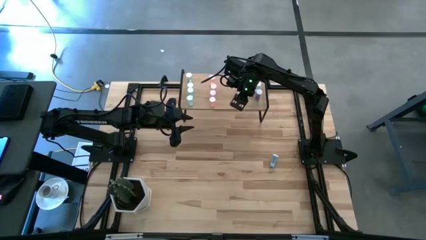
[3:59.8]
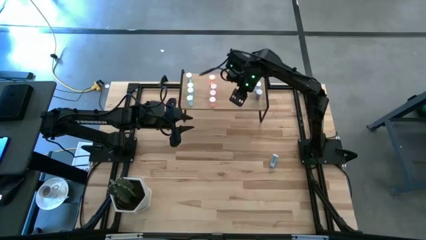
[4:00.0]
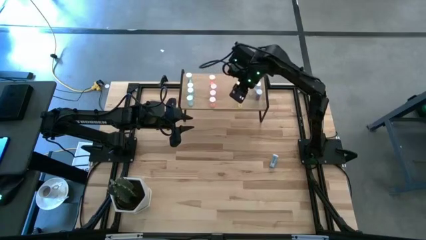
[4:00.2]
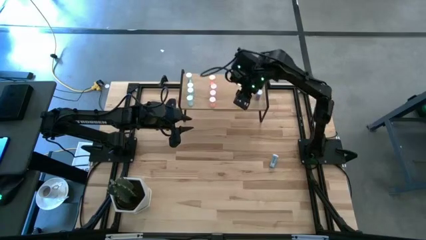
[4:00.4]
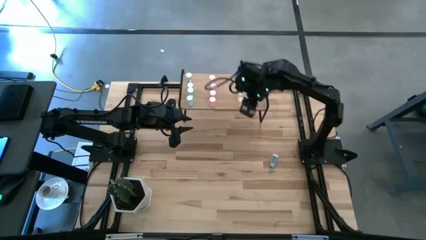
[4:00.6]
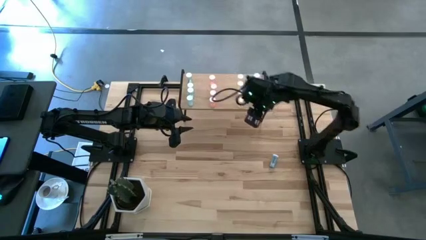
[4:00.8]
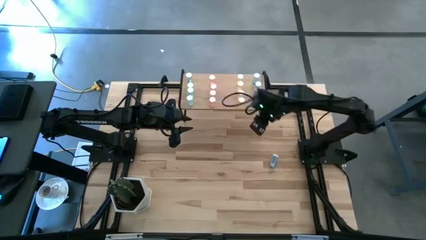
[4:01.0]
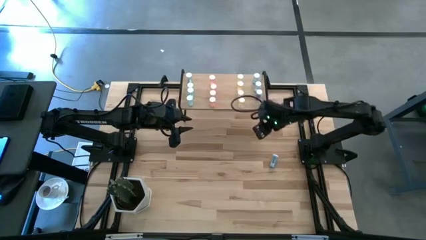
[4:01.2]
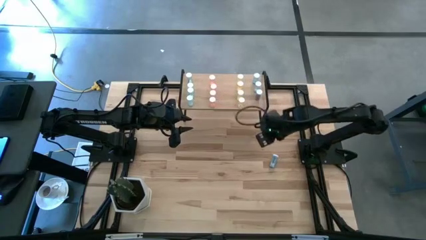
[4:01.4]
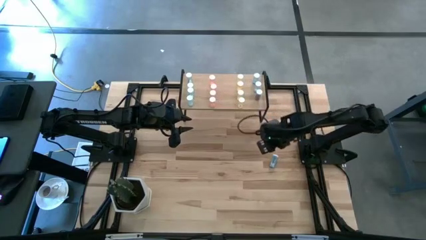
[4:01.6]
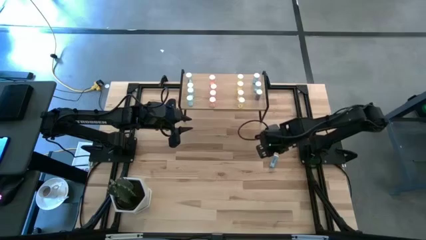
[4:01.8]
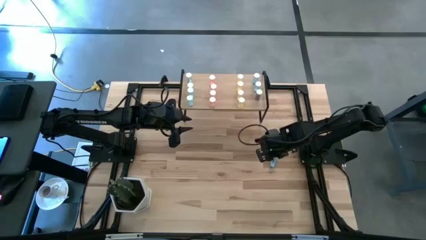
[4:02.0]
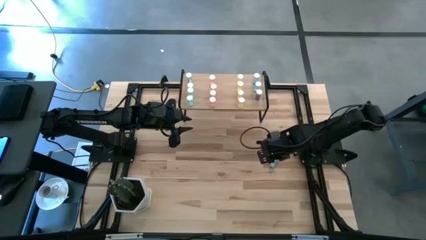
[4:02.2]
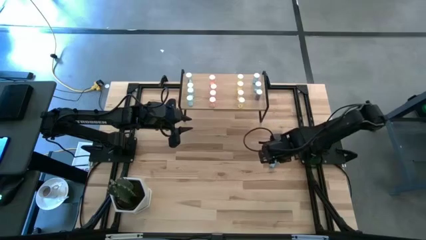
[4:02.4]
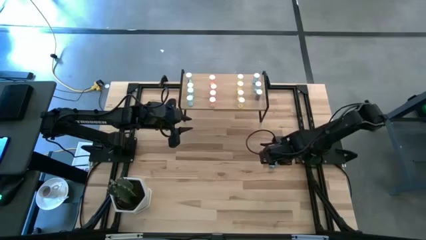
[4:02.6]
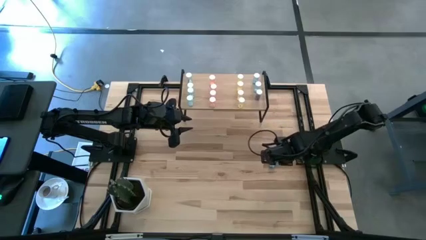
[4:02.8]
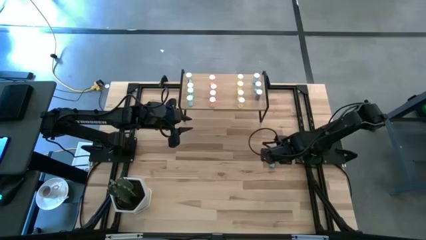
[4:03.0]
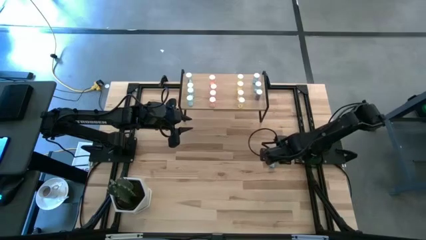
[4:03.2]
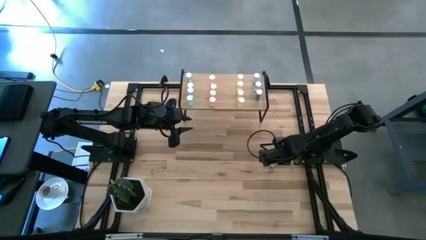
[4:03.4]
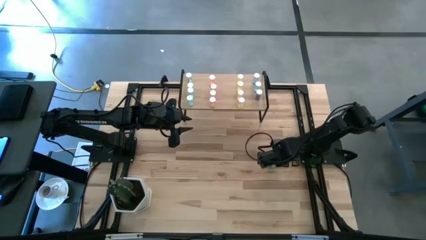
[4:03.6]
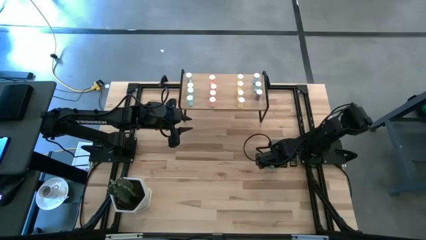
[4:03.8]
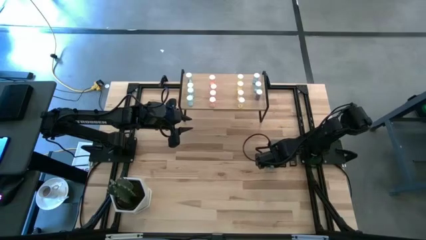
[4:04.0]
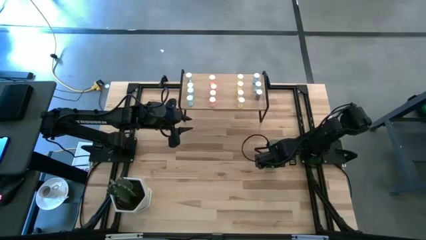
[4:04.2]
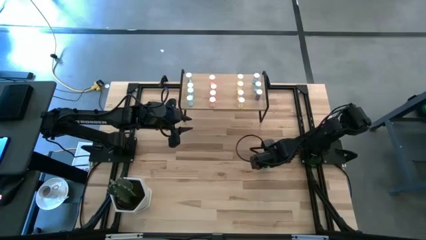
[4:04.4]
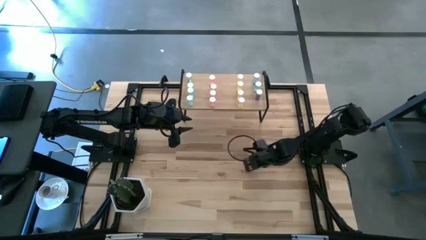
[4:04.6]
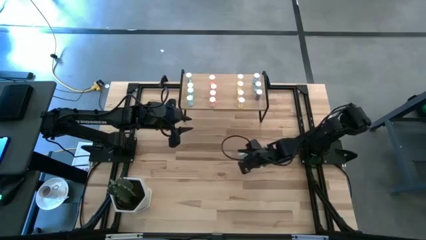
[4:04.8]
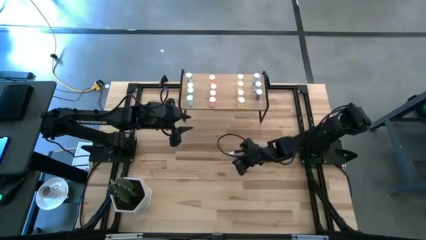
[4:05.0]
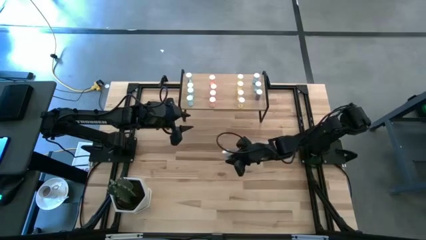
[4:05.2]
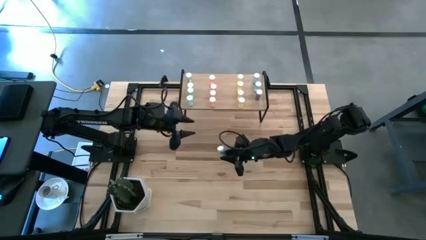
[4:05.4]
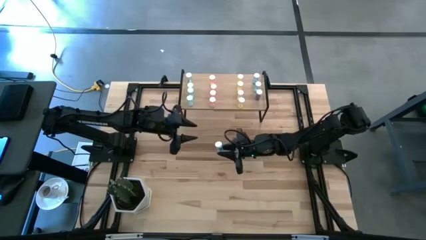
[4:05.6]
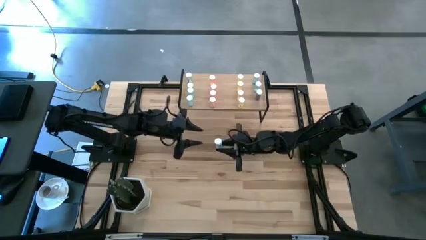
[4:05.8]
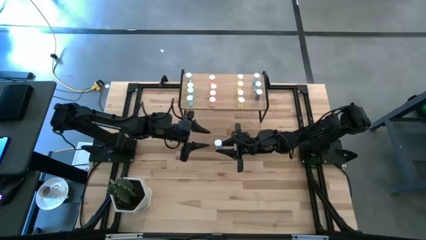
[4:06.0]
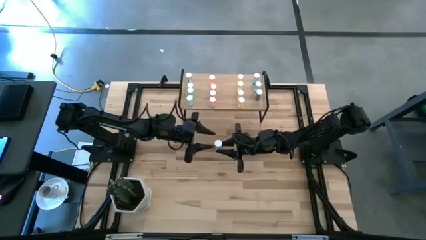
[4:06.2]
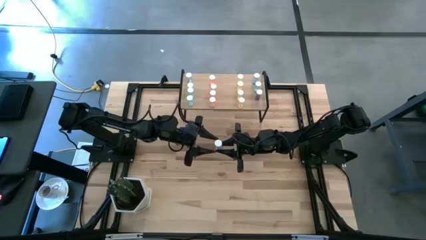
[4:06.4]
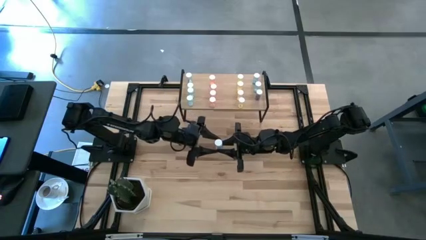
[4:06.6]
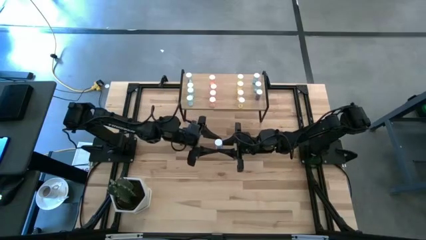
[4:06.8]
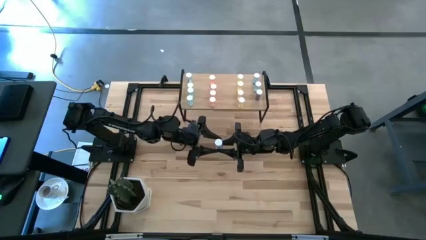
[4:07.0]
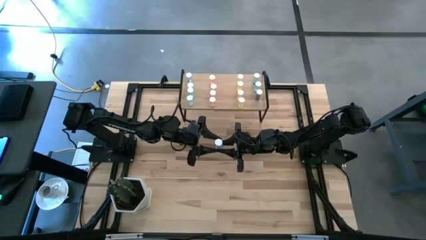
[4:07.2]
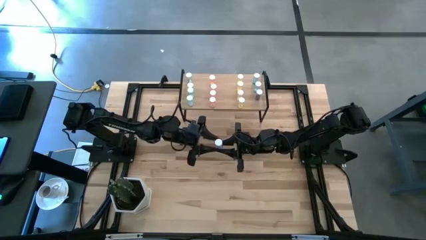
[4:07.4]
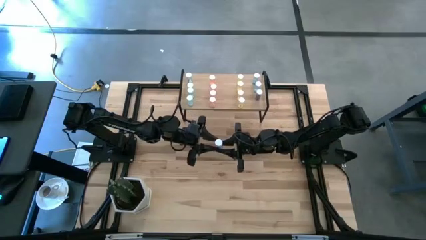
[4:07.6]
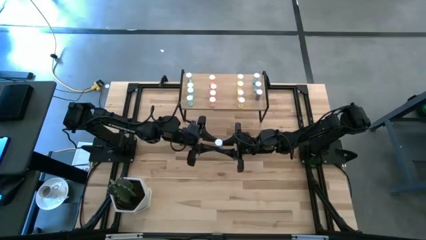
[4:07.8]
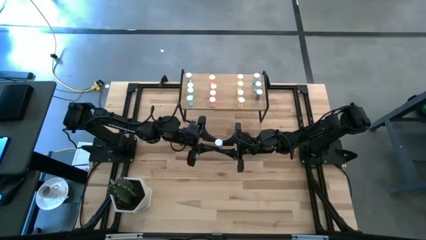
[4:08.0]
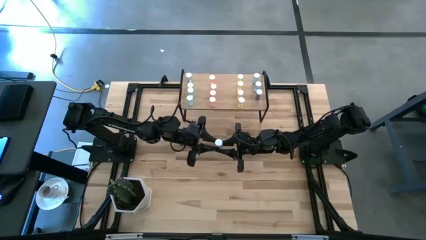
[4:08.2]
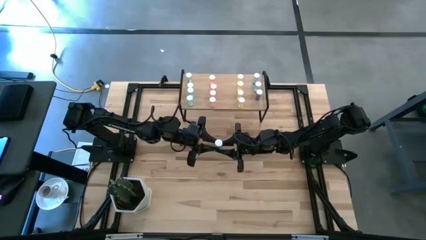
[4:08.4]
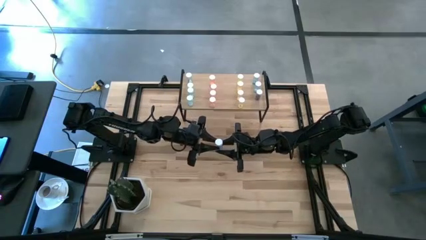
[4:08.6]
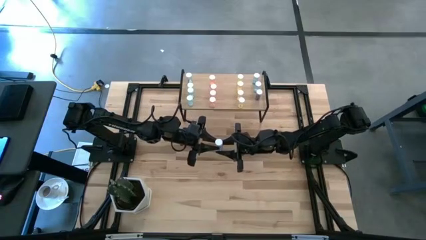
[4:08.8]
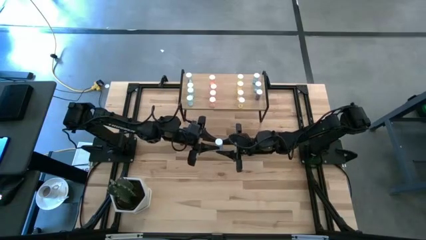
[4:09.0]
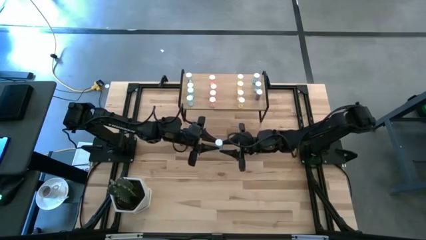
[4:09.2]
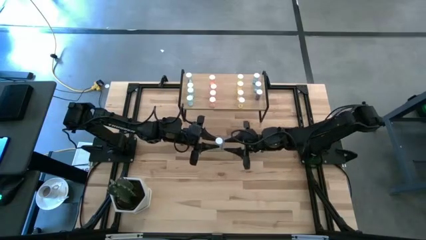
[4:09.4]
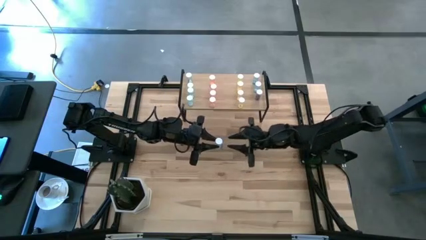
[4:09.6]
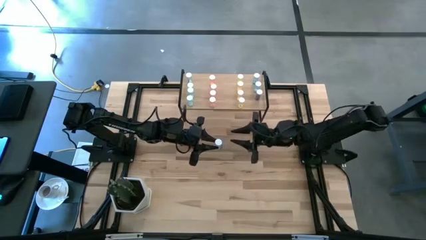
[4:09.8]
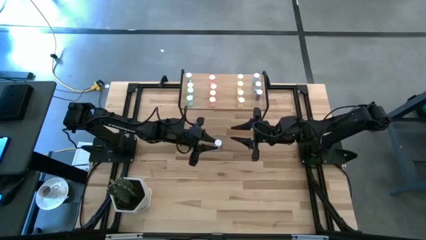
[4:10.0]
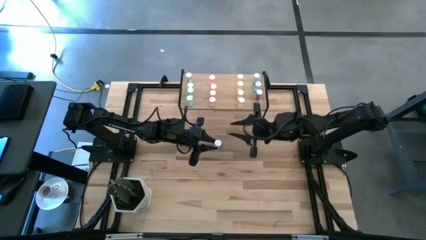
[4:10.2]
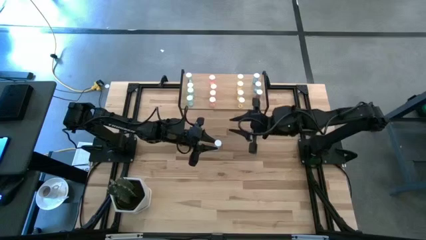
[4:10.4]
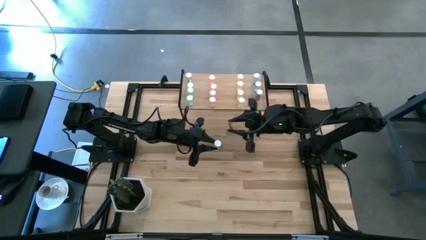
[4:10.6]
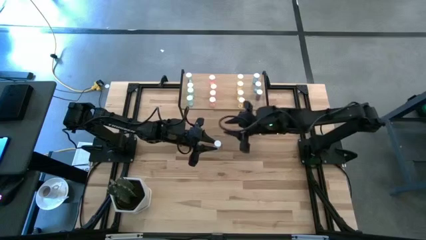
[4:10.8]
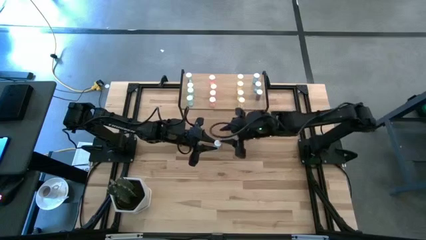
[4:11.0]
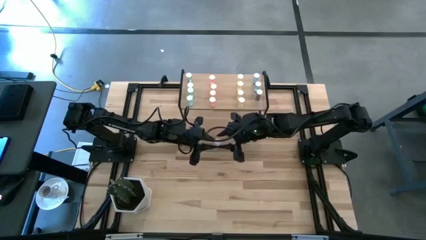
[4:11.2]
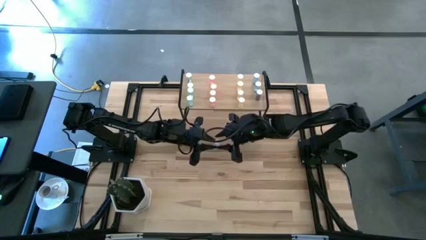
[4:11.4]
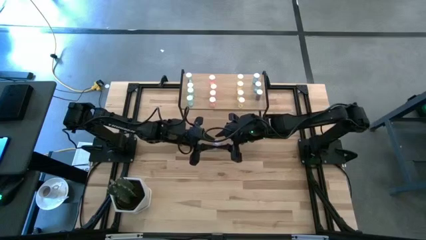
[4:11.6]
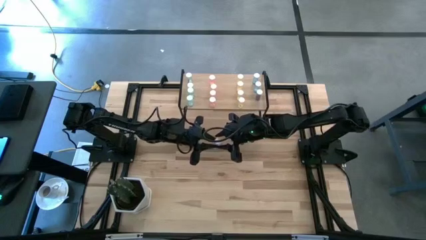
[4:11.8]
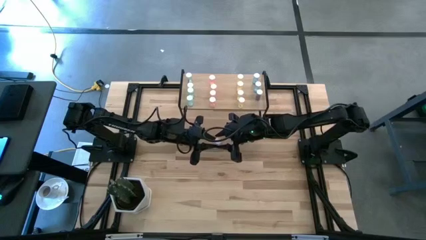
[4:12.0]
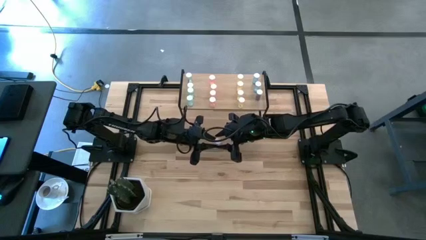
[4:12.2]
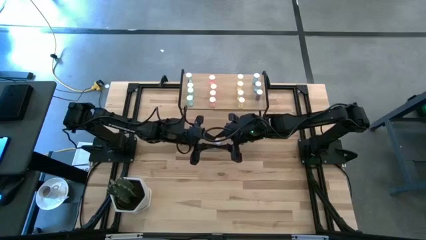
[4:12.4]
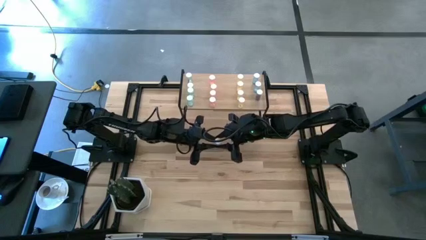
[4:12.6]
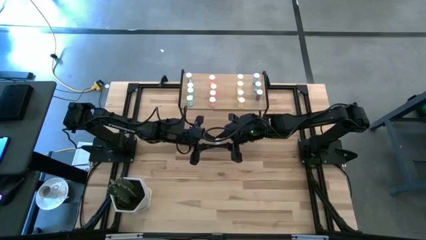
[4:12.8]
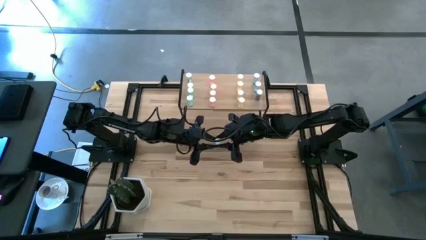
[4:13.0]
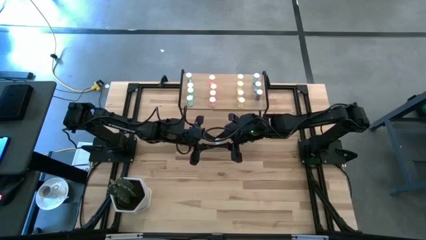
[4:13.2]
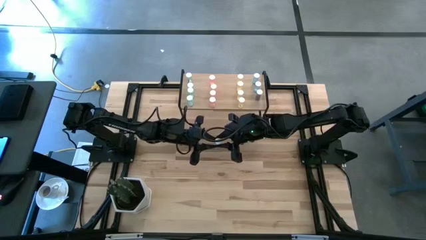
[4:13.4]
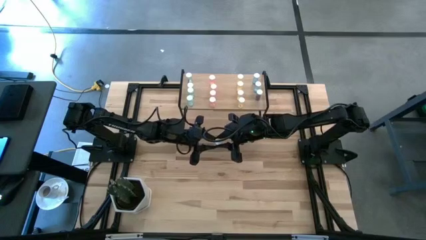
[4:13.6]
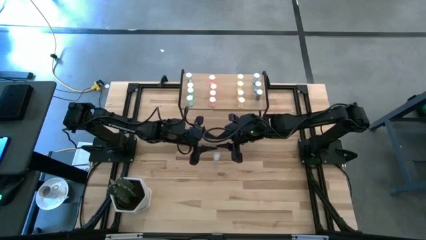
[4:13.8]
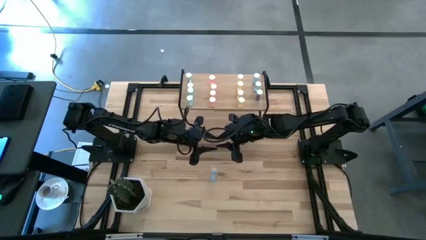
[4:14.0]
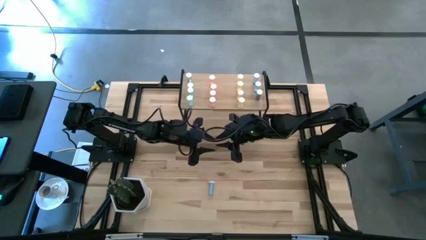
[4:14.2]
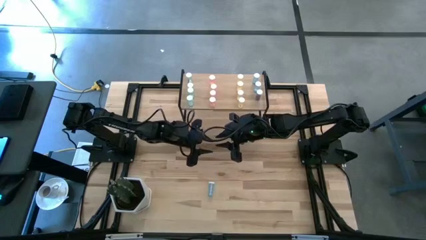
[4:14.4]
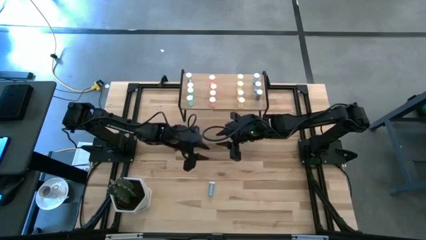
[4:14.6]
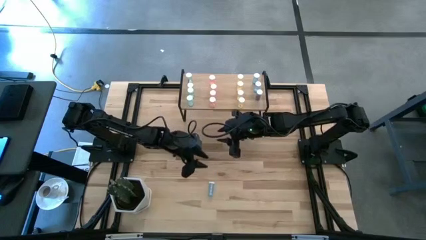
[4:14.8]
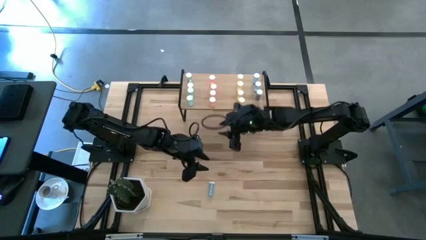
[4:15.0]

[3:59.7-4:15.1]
Task: Pick and place medicine bottles onto shelf by color
Align the blue pill bottle with the blue pill bottle
